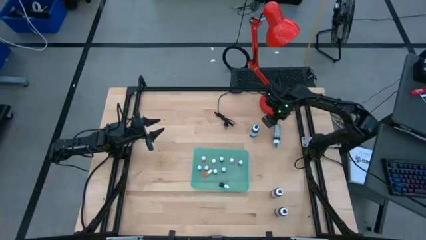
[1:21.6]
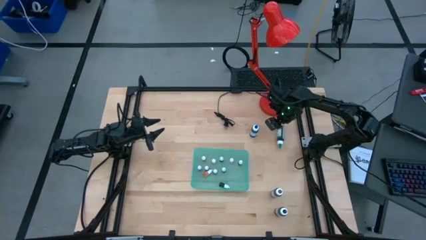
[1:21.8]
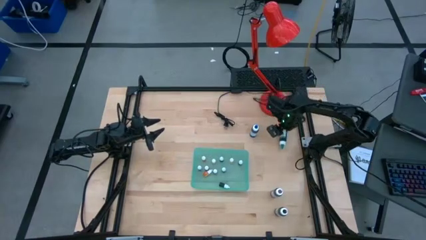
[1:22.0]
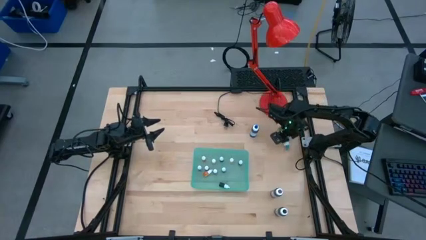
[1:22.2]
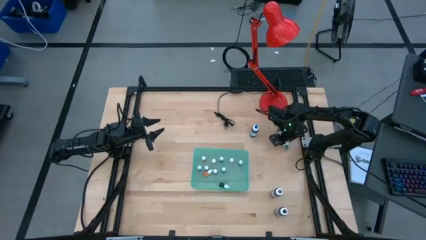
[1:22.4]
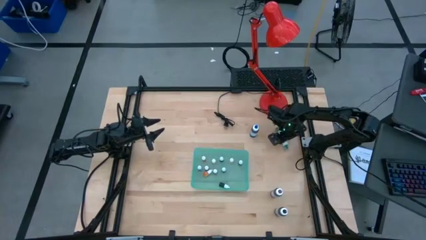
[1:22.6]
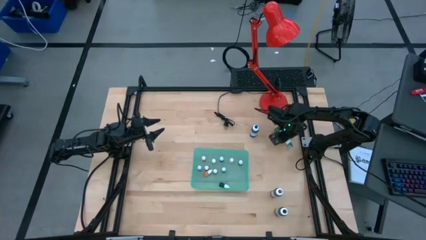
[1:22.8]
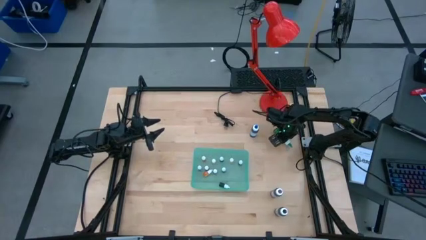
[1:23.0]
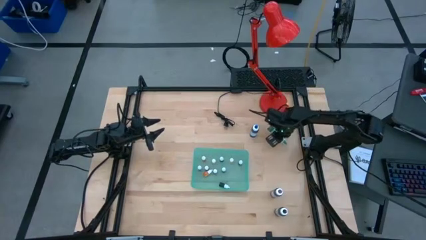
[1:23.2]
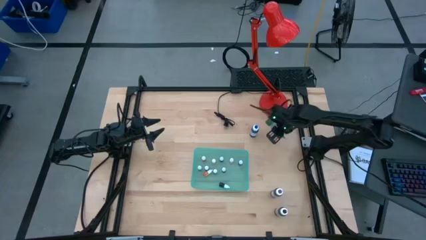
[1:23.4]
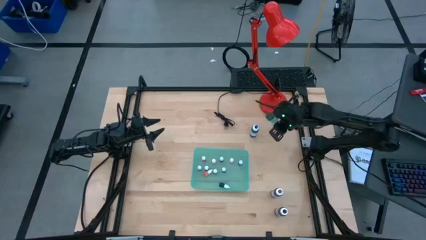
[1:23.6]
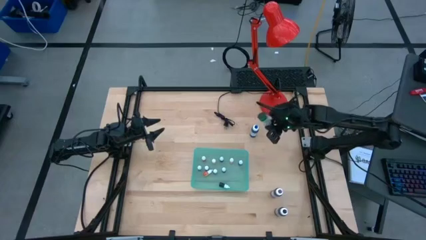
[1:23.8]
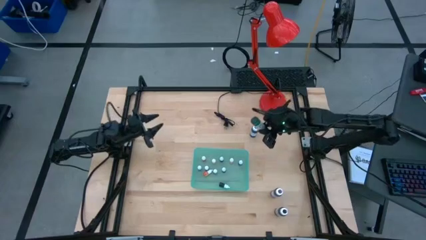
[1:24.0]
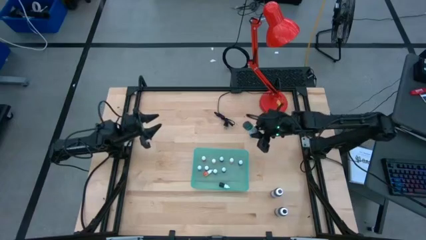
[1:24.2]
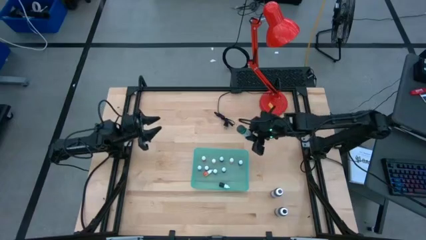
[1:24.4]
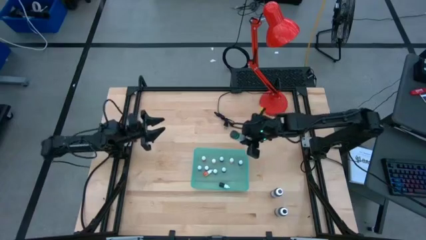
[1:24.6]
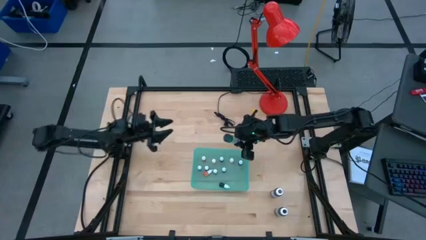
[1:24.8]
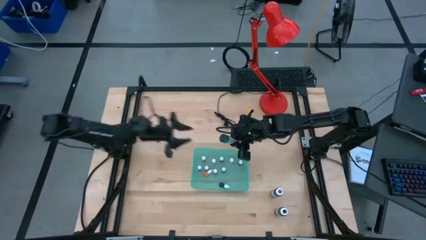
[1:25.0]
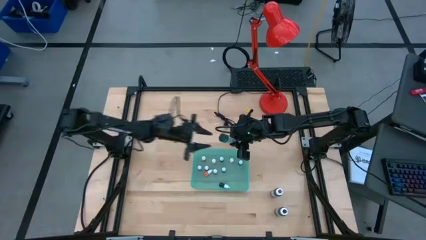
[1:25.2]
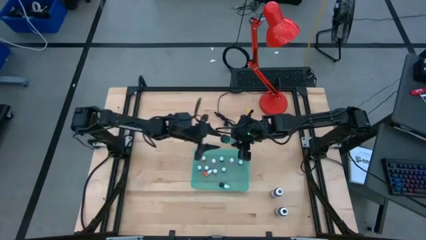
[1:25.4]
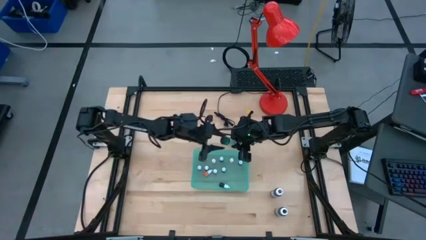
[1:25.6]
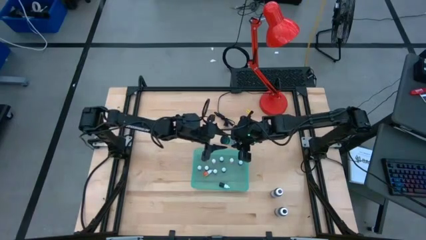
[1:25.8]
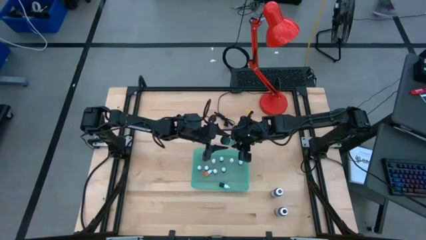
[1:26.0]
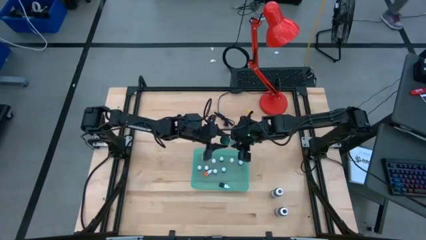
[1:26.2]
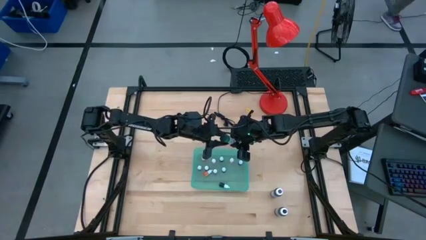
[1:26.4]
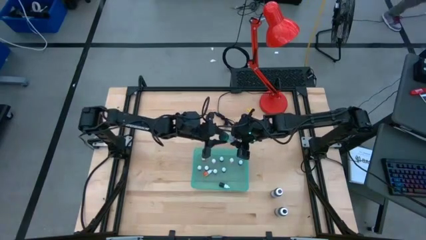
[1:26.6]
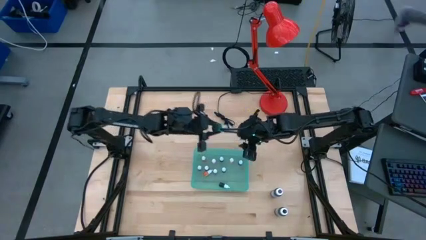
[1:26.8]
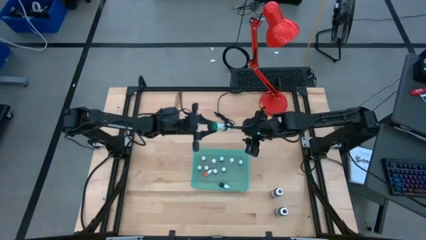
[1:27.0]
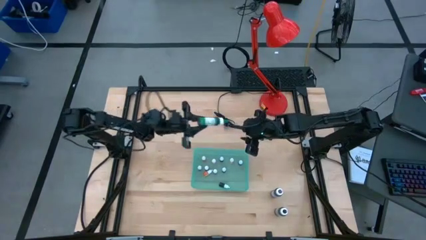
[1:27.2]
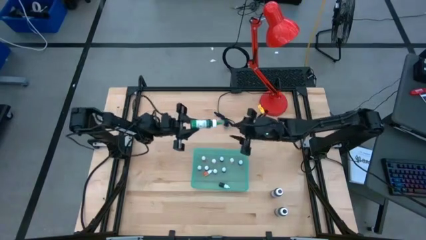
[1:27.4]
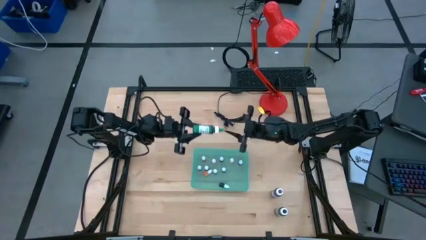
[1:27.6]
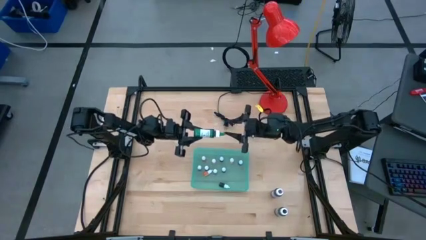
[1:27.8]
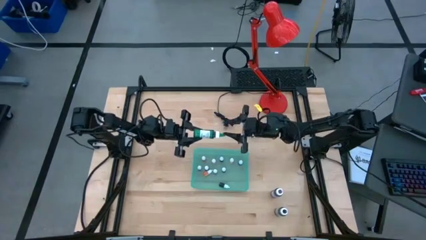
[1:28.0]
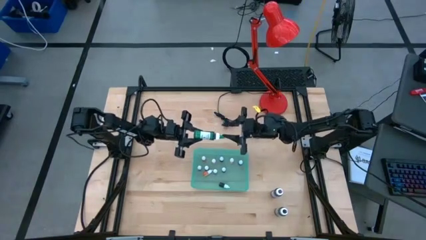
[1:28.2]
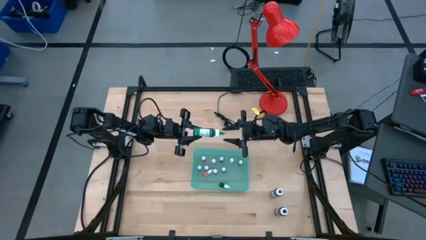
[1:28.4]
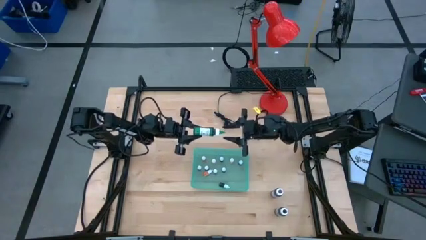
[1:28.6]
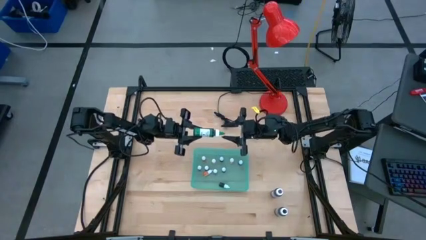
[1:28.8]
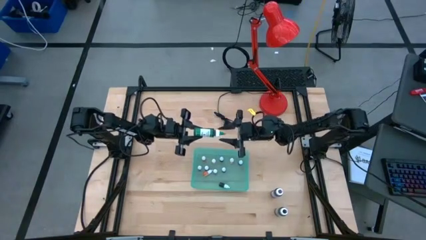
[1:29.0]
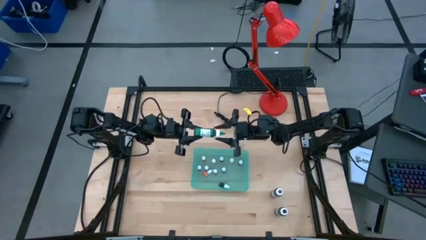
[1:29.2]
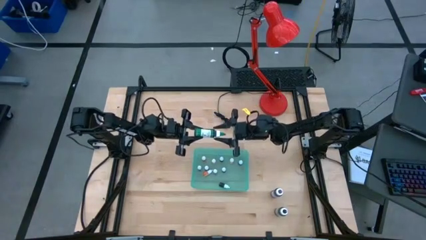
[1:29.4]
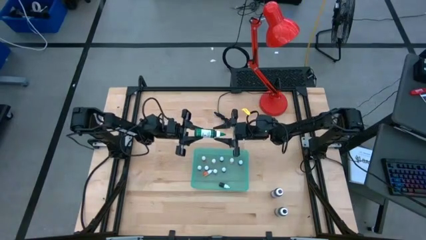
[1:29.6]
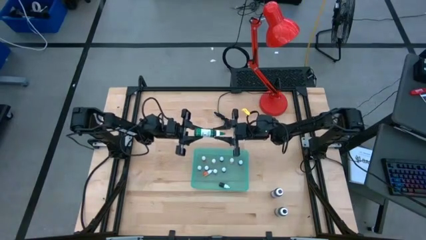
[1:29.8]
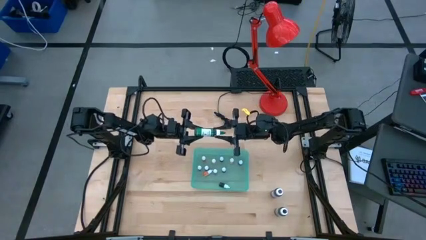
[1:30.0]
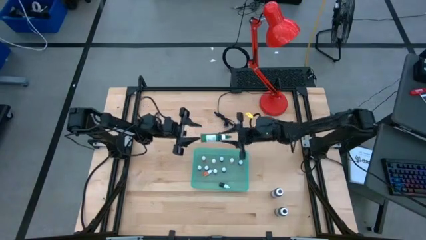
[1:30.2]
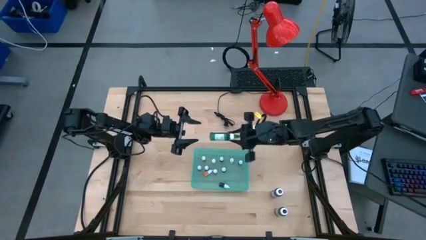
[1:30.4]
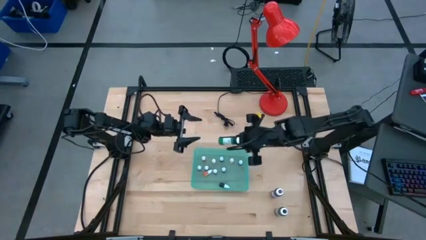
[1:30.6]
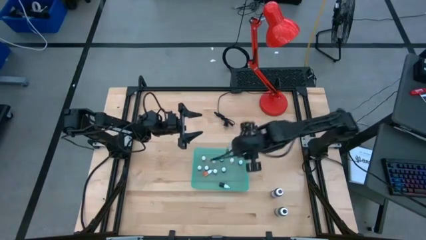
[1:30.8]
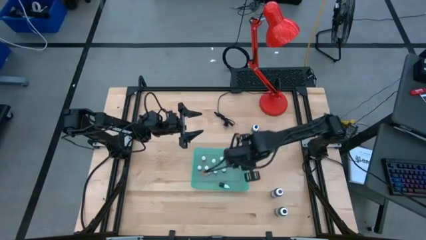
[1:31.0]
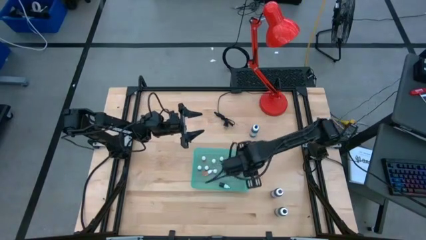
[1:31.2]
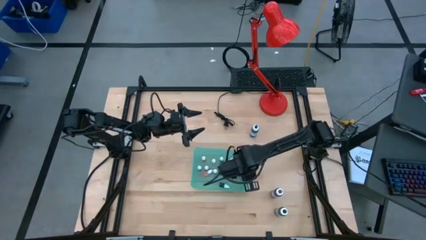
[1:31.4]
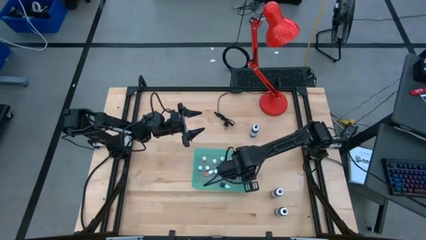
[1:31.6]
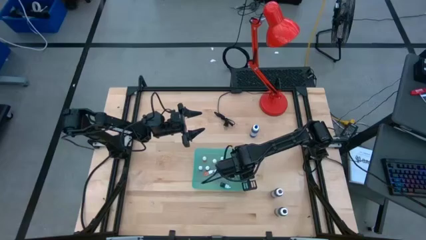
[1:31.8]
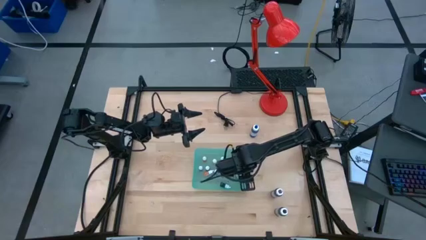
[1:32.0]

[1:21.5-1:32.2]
Task: Pick & Place food coloring
Put the big green food coloring bottle into the light blue bin

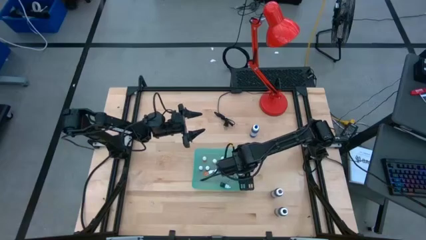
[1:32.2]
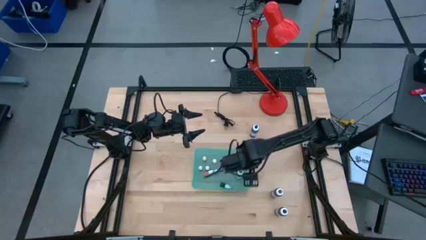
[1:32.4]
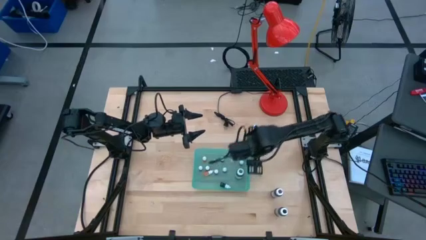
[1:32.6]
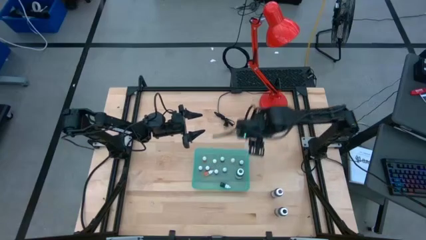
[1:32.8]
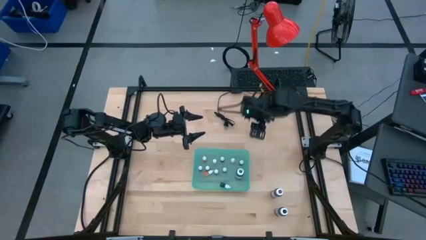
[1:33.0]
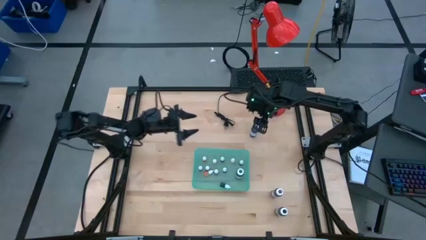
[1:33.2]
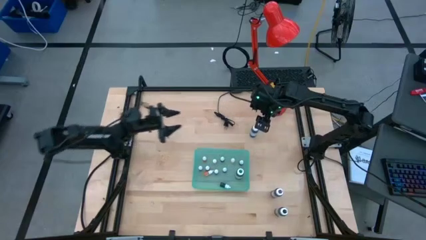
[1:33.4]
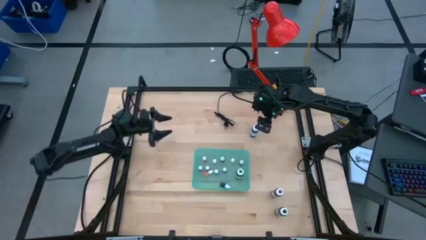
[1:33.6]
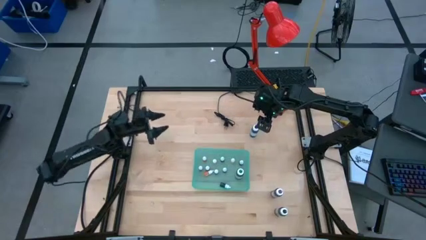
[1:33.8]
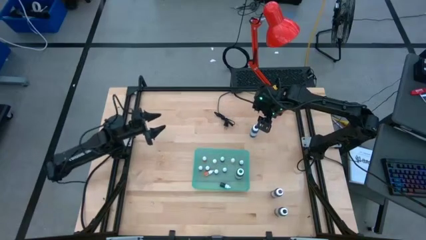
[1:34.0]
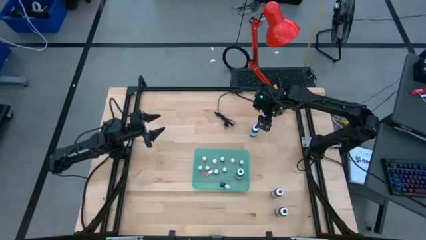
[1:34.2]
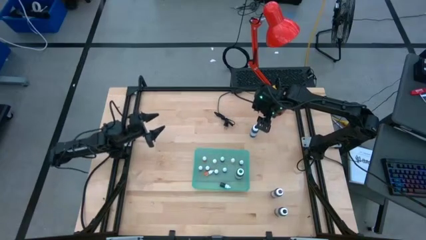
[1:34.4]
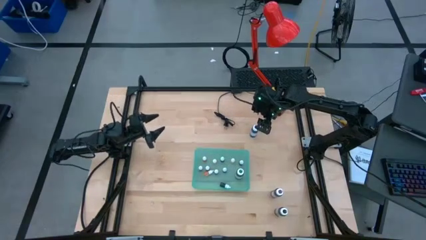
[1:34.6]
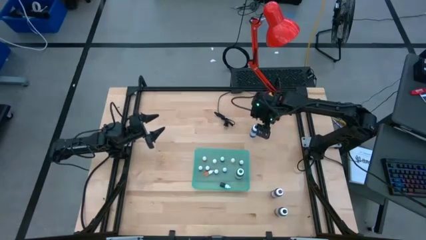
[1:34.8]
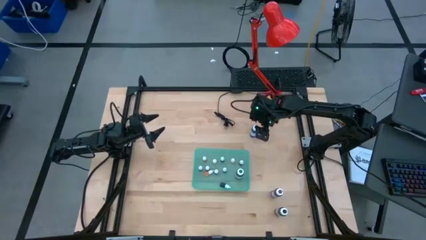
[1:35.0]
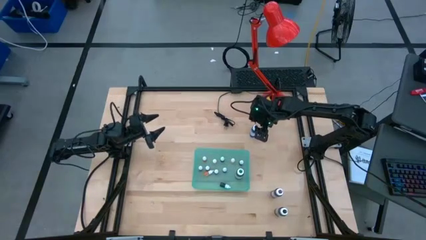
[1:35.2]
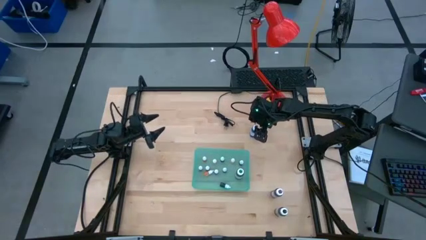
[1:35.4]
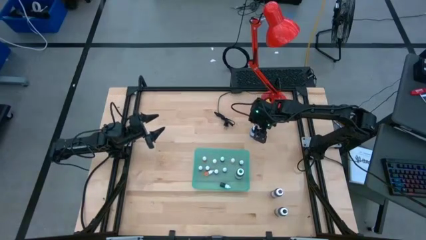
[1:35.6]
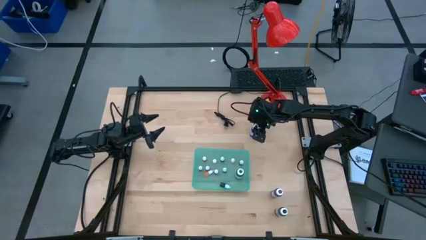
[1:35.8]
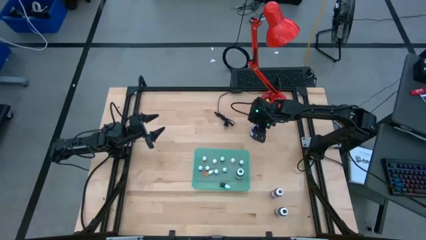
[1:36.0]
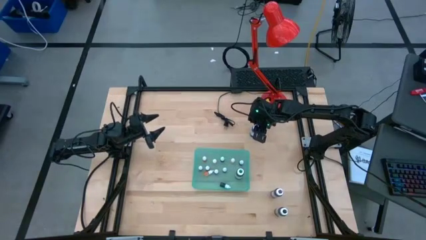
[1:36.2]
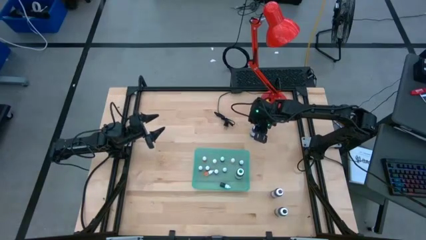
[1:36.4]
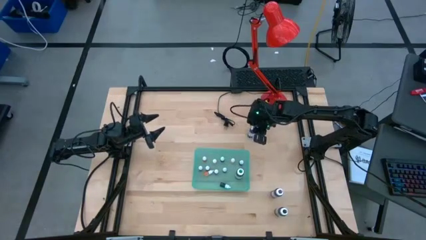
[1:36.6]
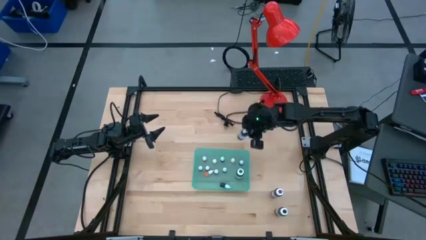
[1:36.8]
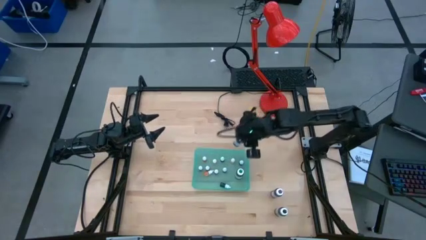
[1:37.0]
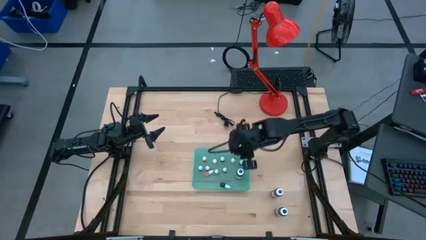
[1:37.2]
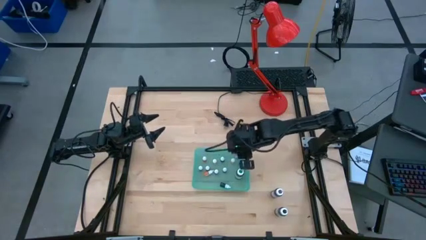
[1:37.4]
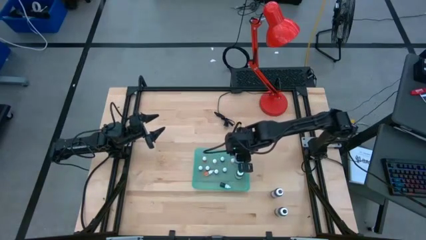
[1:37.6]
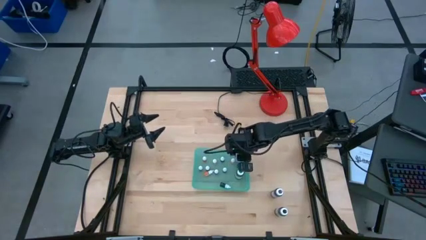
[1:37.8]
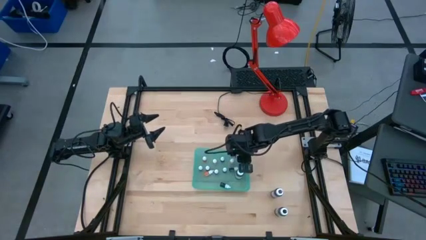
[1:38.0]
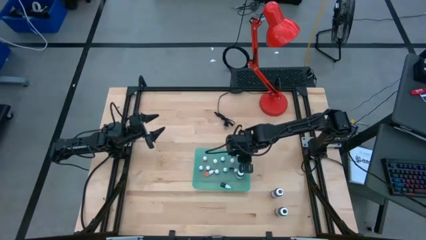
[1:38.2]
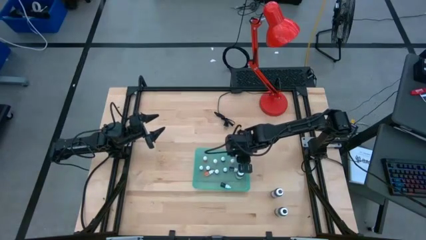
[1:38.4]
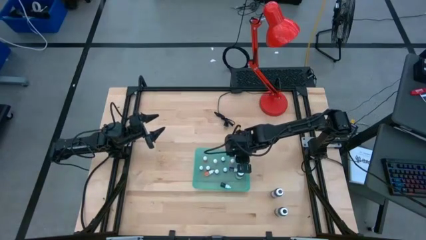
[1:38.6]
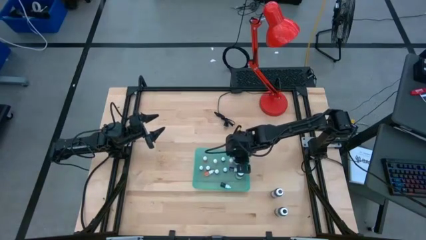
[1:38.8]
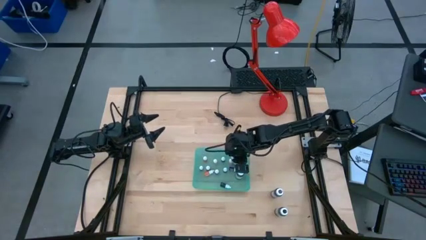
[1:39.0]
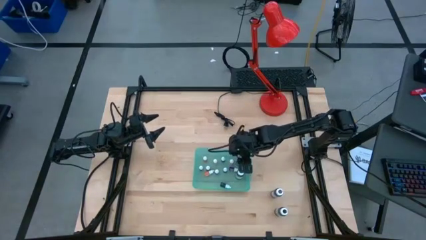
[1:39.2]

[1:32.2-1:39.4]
Put the big blue food coloring bottle into the light blue bin
